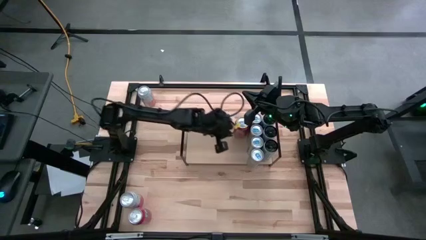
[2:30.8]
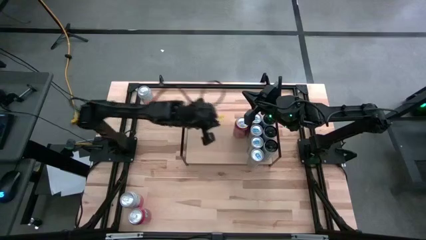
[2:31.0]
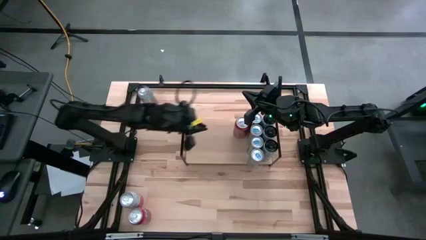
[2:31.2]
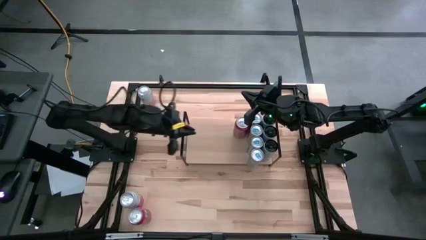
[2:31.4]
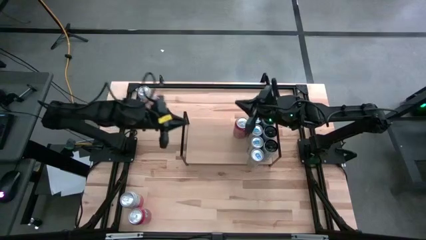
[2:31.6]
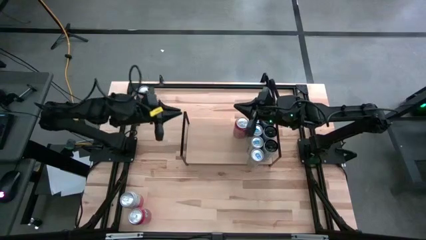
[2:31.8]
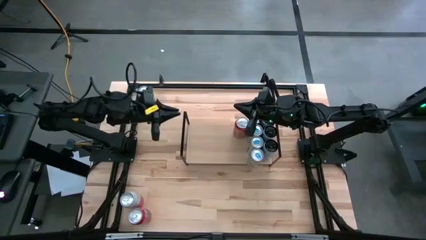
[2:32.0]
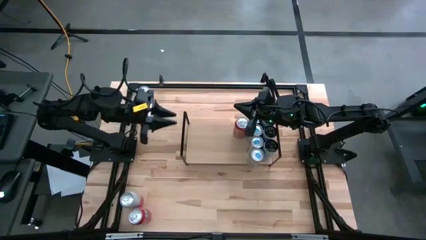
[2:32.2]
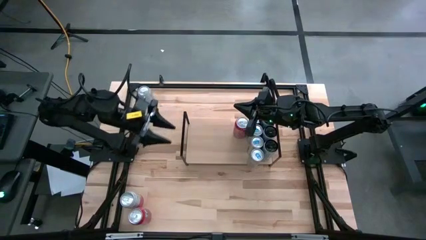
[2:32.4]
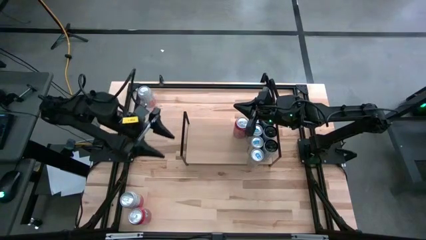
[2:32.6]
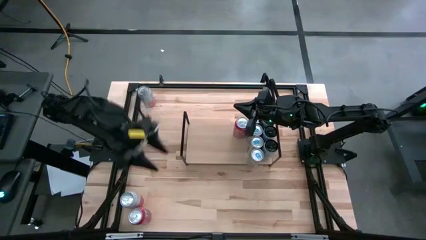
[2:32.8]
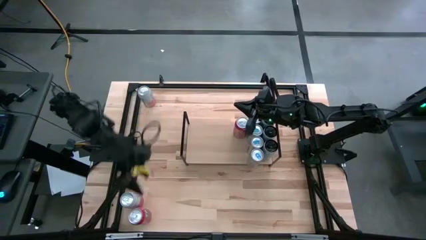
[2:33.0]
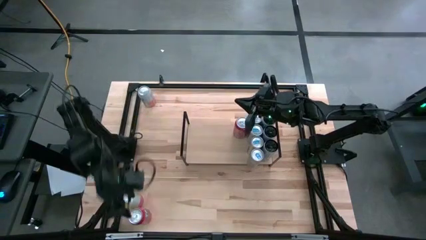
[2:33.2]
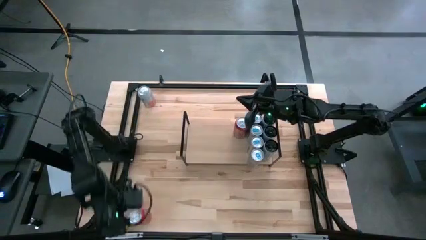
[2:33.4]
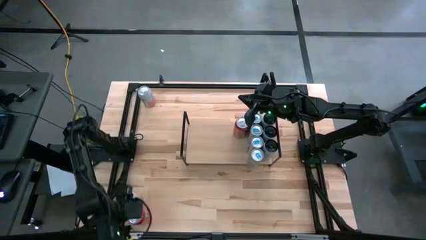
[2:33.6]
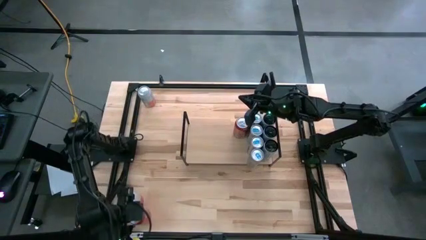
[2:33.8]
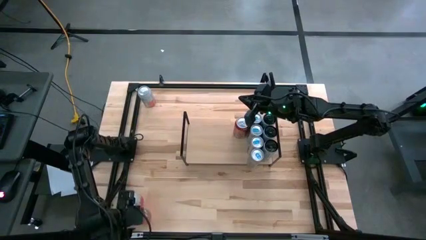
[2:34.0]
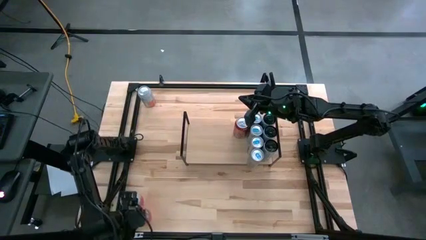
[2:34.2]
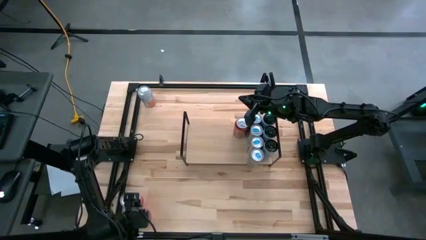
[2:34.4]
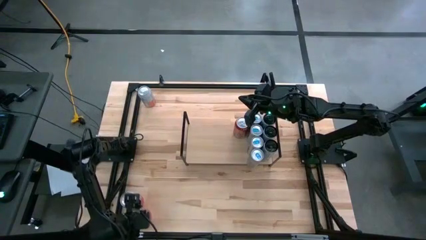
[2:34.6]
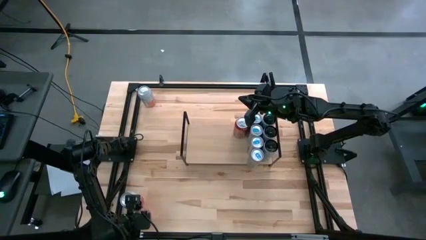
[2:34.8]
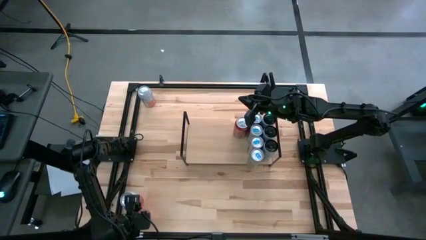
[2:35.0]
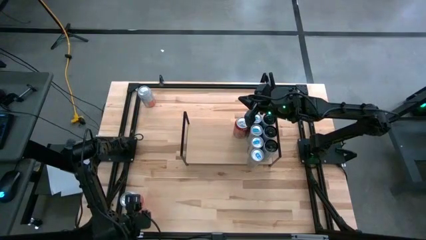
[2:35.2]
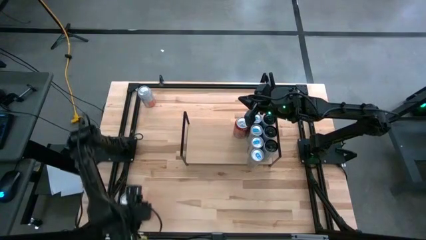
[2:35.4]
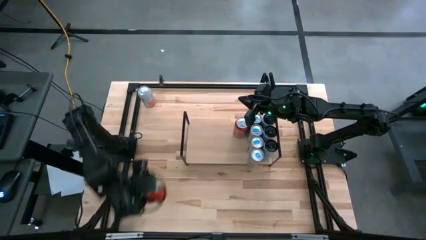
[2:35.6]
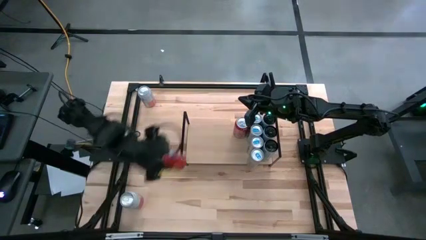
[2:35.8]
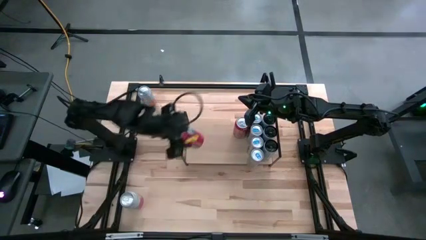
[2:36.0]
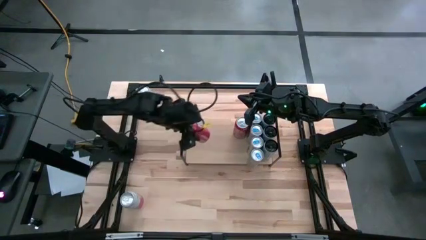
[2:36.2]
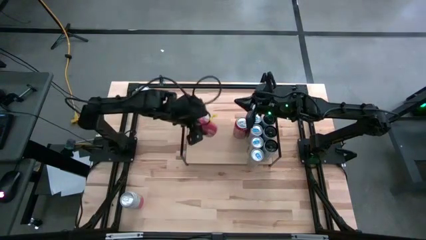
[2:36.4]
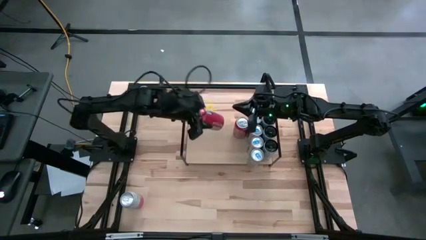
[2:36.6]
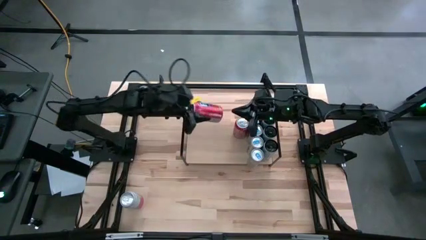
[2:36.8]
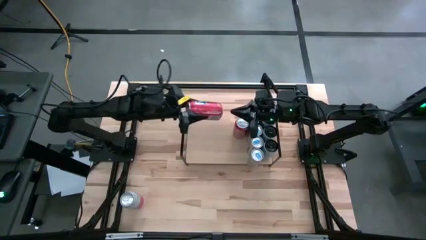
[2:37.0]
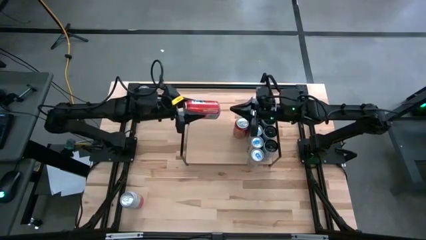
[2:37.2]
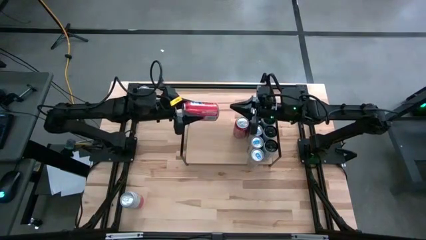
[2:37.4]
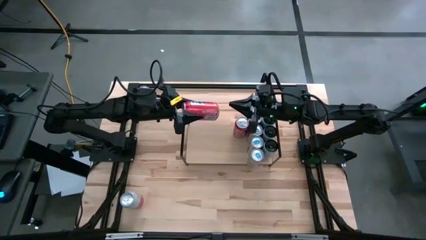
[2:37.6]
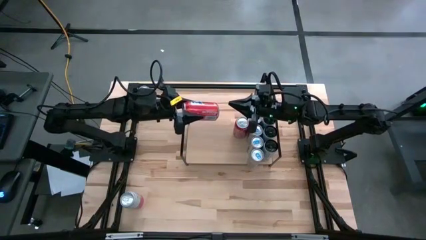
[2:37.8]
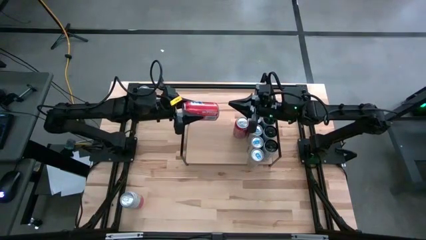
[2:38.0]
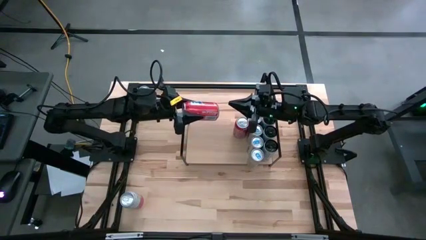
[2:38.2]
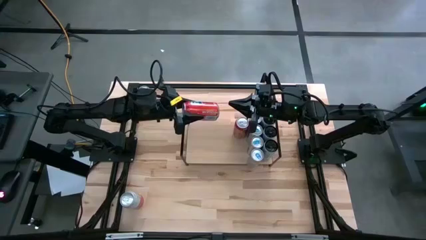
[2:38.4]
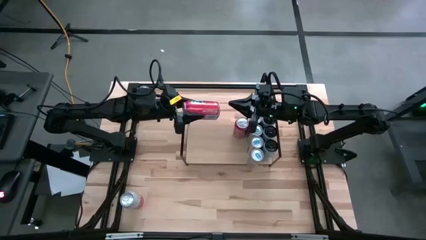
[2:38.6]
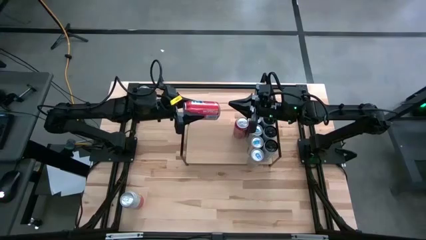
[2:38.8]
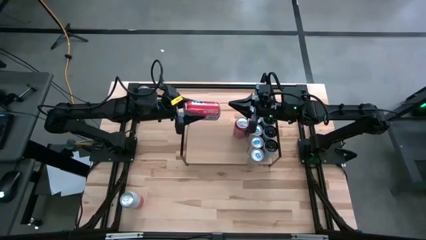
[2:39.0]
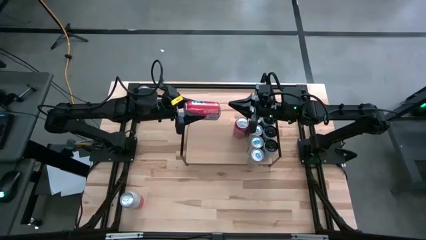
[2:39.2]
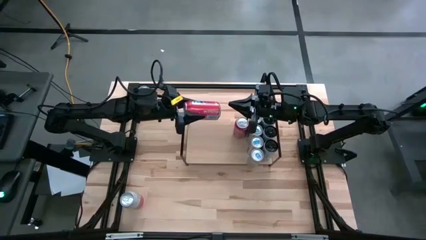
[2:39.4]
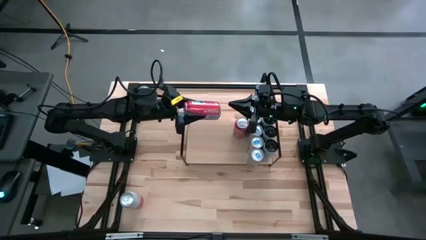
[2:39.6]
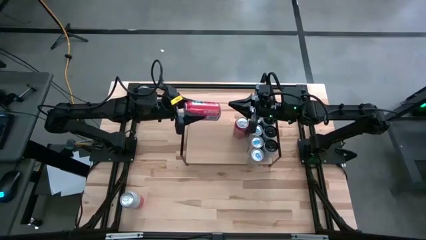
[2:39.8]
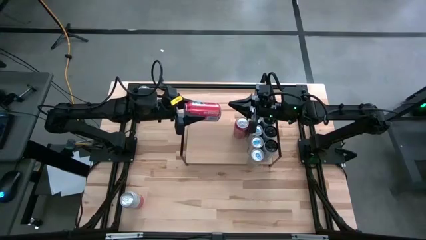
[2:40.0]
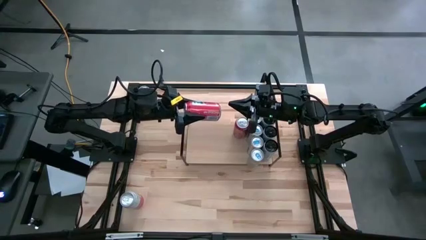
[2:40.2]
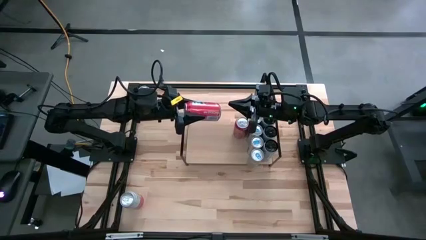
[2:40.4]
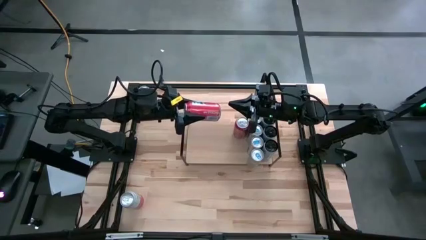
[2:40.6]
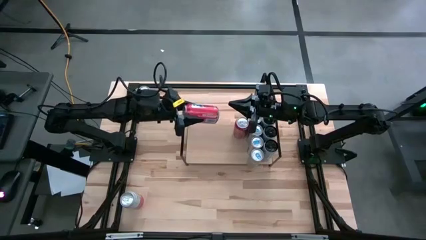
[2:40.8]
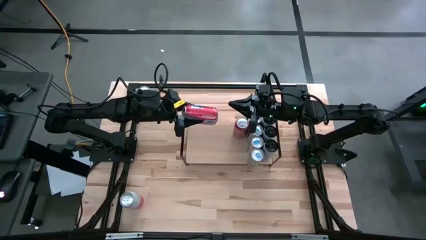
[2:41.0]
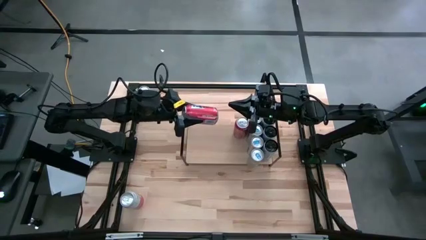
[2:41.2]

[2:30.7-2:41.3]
Task: Place canned beverage on shelf
Put the red soda can on the shelf aligned with the other red soda can

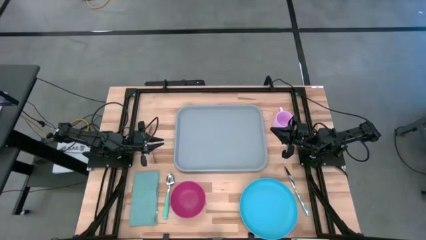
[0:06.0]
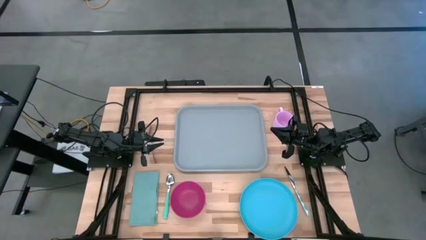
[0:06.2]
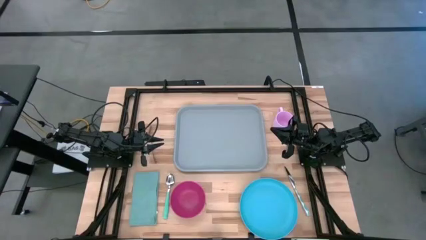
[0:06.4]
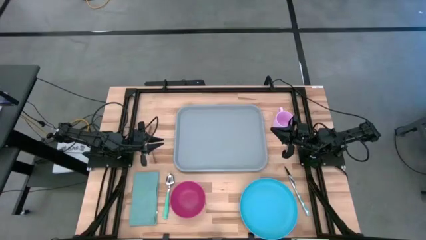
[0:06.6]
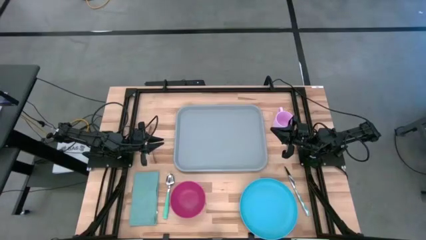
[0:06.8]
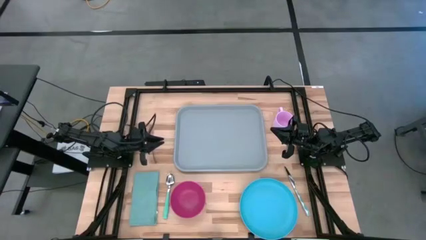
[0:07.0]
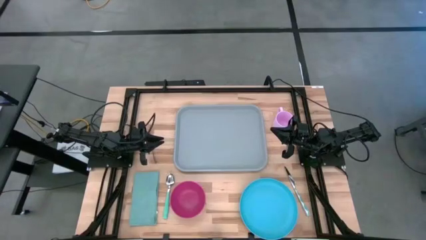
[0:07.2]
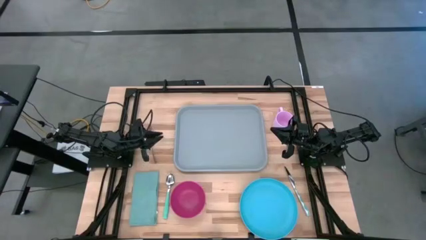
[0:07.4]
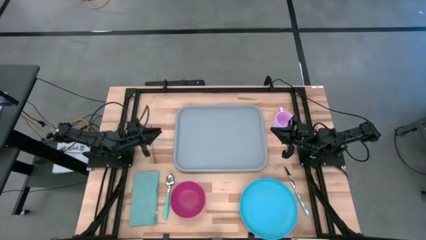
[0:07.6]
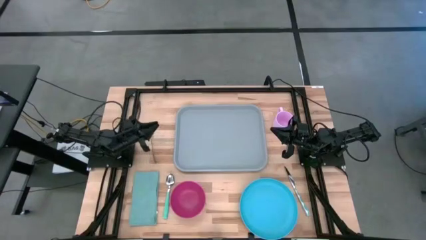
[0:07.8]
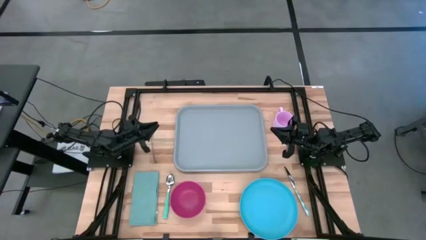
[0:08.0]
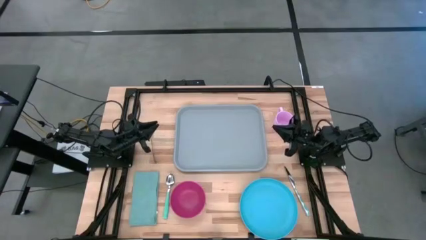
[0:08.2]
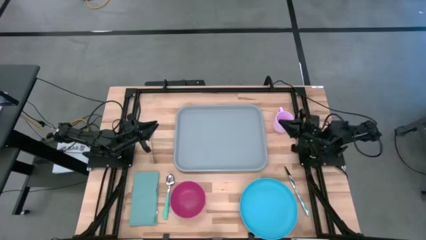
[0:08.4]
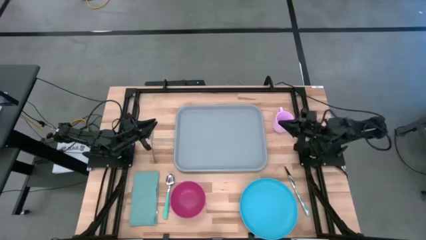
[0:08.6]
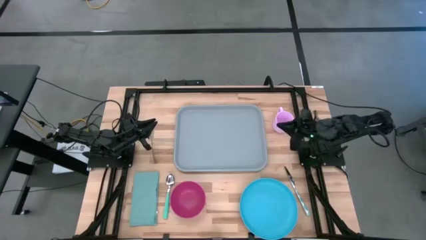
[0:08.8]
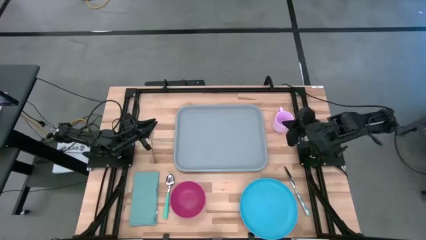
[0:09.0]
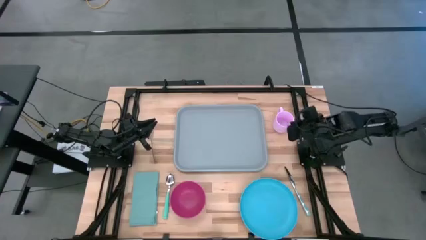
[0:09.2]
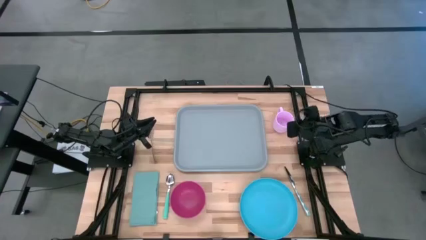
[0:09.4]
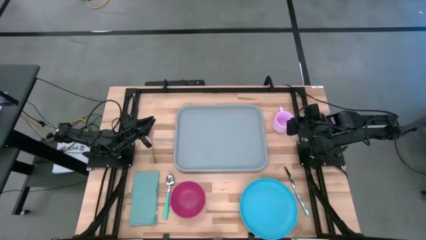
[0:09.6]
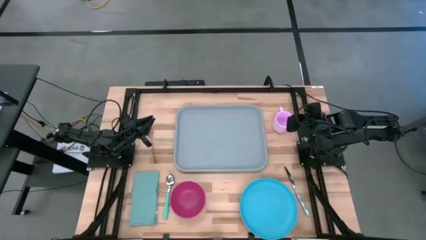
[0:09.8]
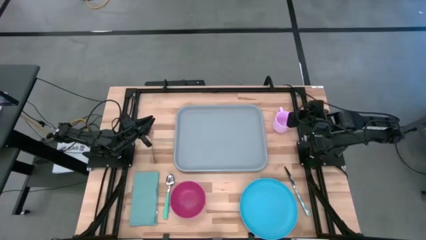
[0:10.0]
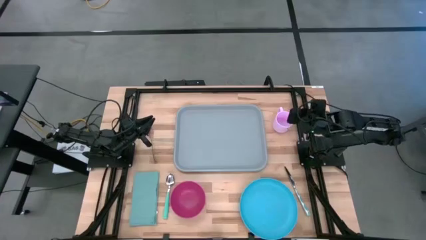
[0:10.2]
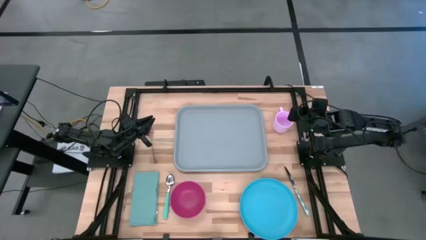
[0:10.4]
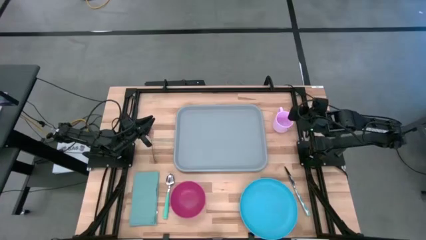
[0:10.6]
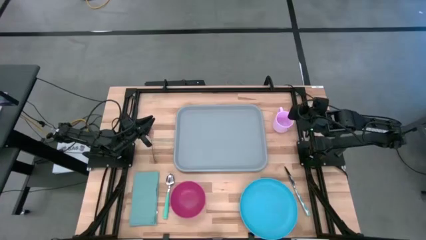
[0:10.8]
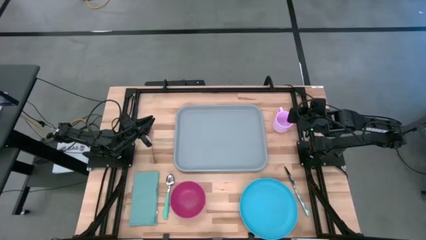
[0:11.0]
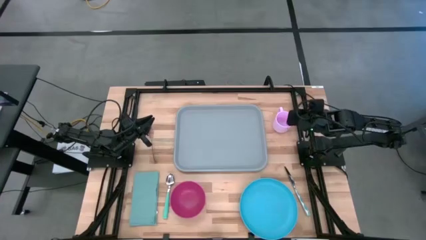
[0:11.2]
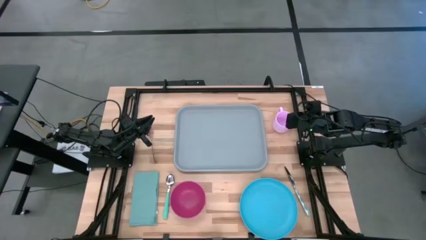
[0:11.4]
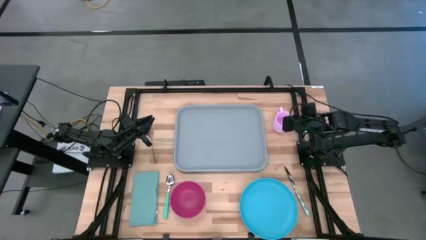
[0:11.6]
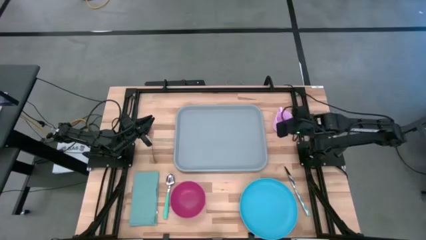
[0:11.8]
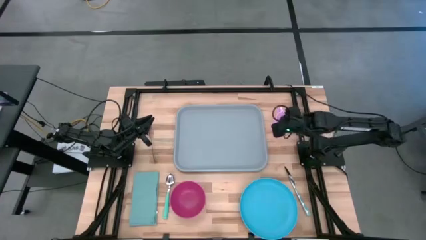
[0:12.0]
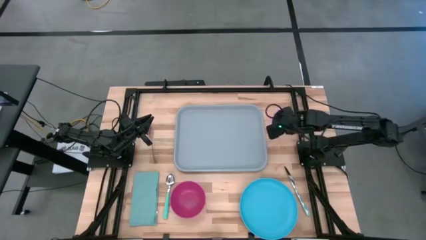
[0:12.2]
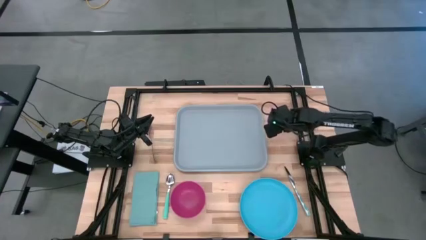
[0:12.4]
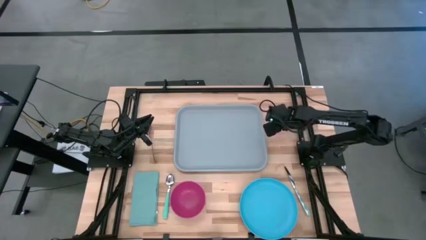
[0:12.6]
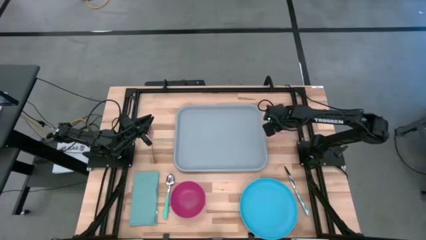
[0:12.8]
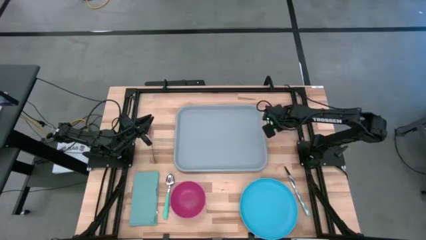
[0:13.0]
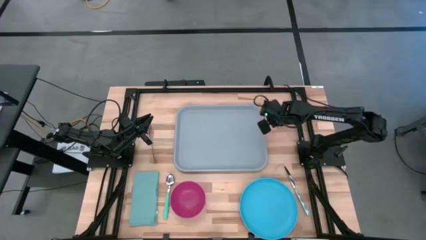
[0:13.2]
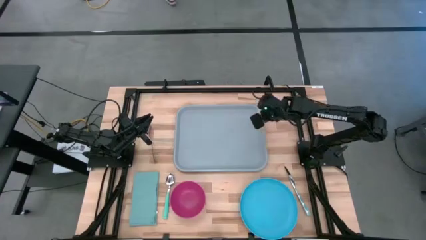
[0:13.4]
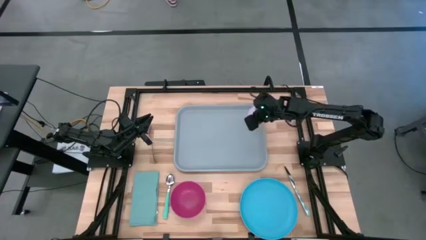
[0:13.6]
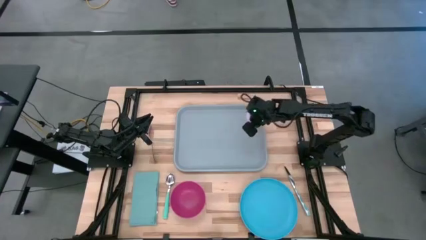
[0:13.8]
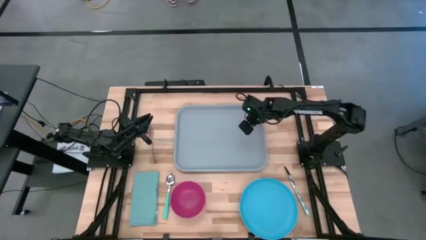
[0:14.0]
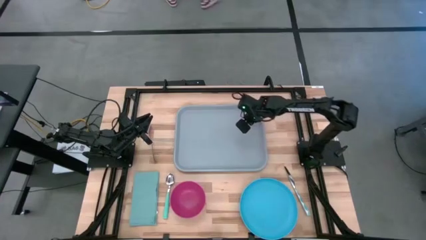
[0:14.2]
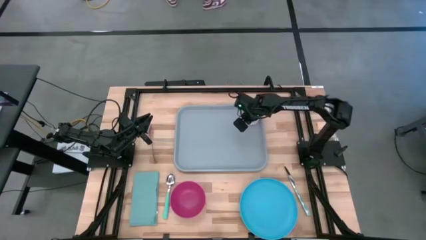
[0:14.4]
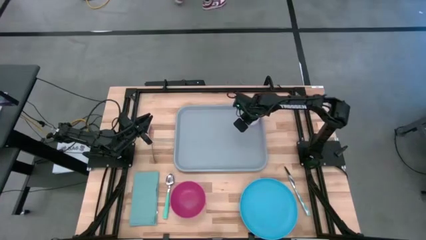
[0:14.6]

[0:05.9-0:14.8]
Task: Set up tray
Put the pink cup on the gray tray
